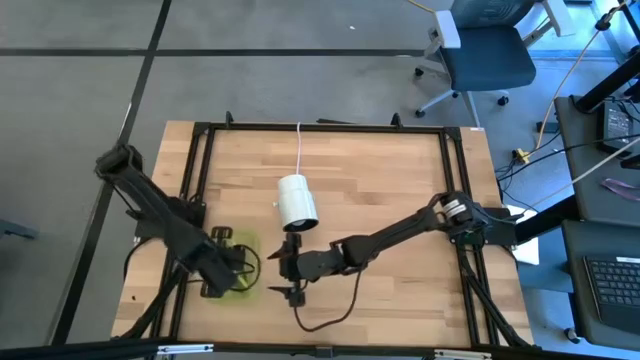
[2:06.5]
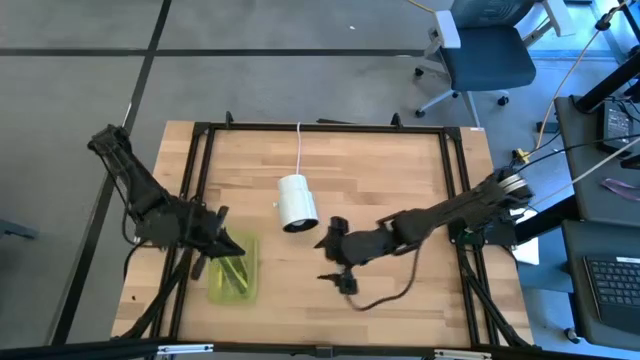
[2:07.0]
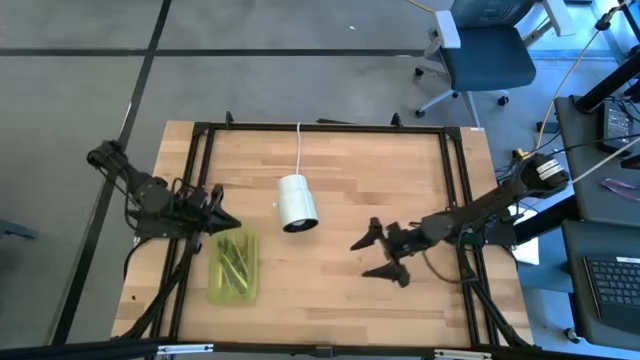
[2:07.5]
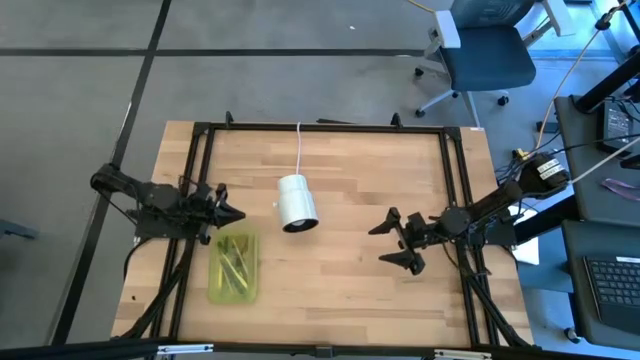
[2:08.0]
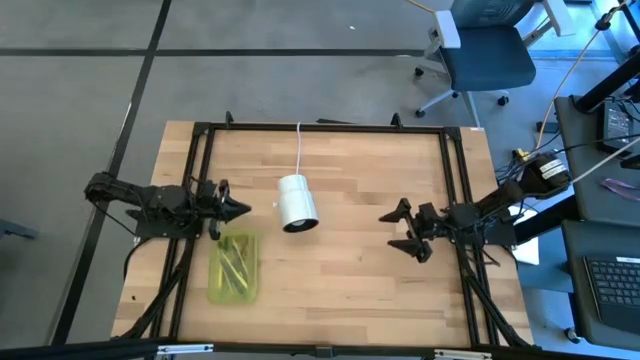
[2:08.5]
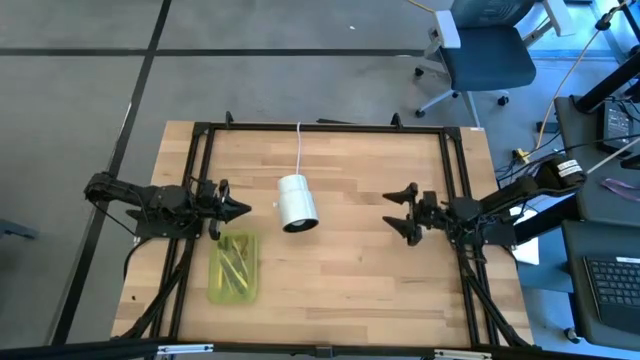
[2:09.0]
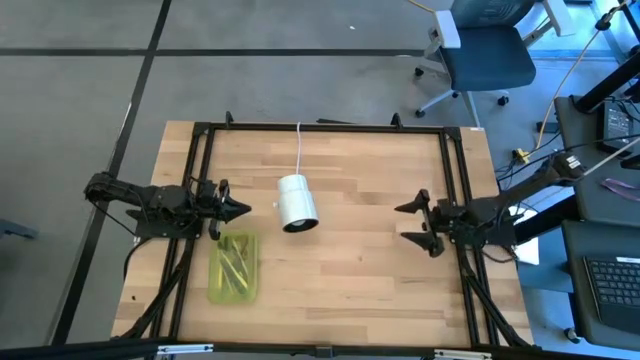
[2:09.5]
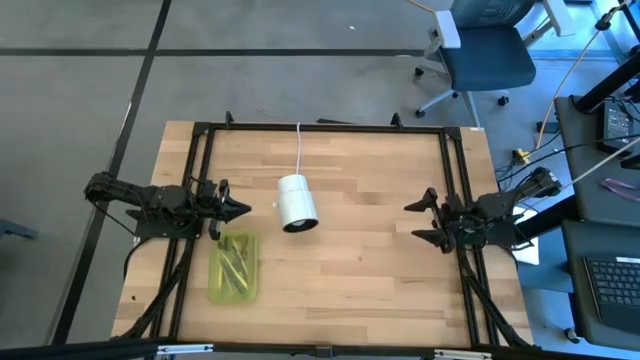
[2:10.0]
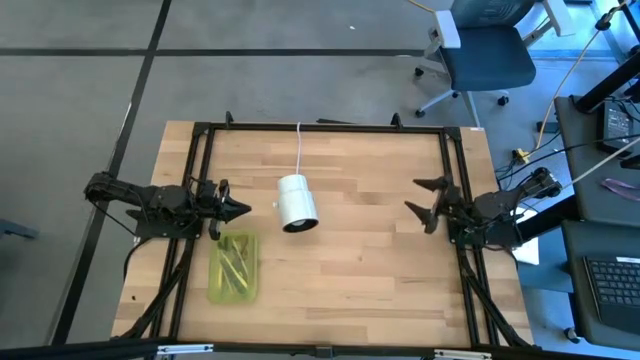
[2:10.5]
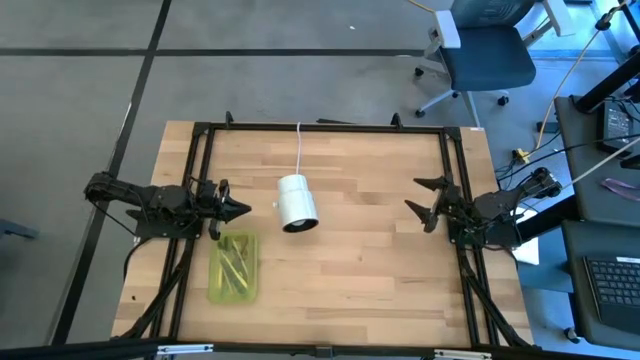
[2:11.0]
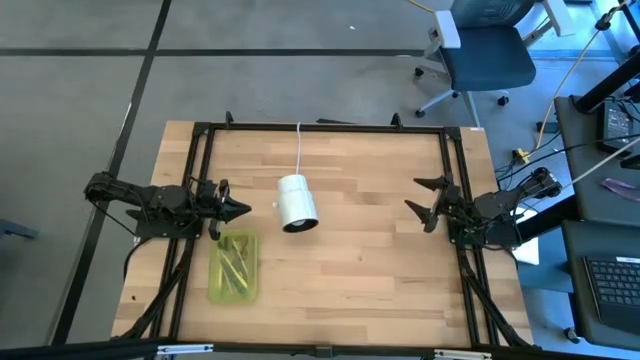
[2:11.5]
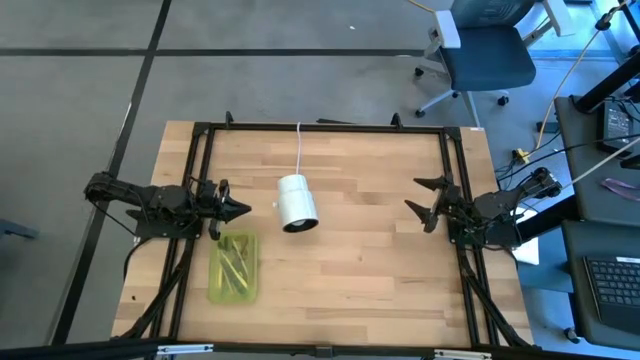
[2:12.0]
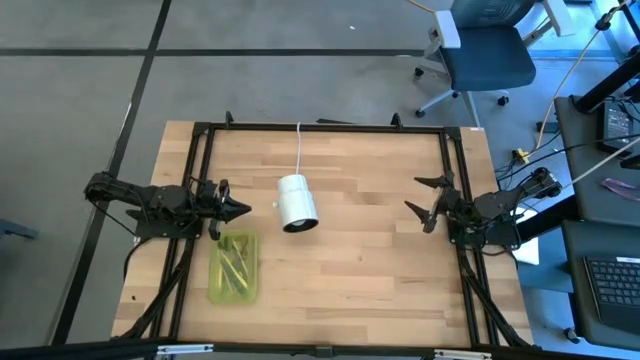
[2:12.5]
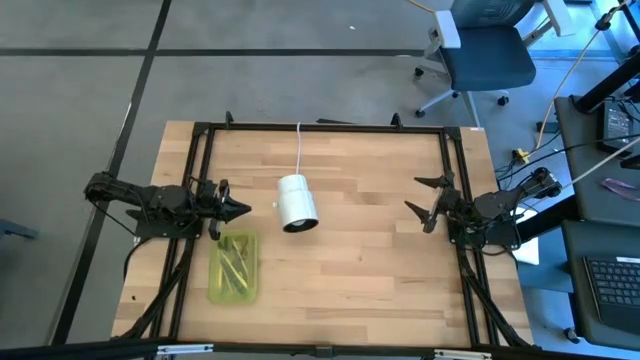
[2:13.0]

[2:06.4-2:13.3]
Task: Pick & place school supplies into a supply box
Return to Home Position

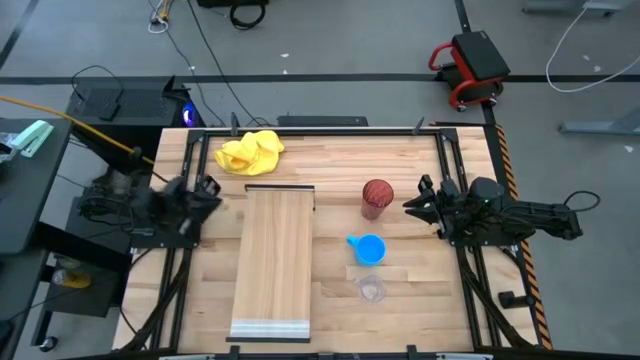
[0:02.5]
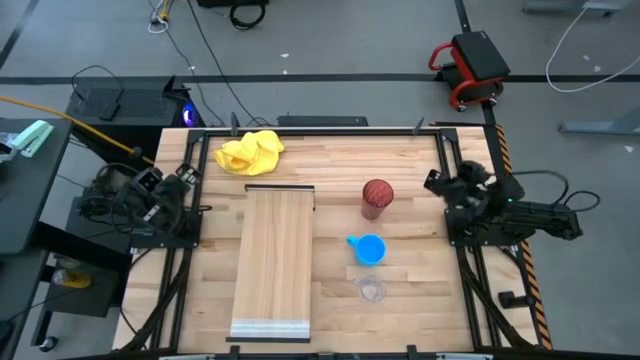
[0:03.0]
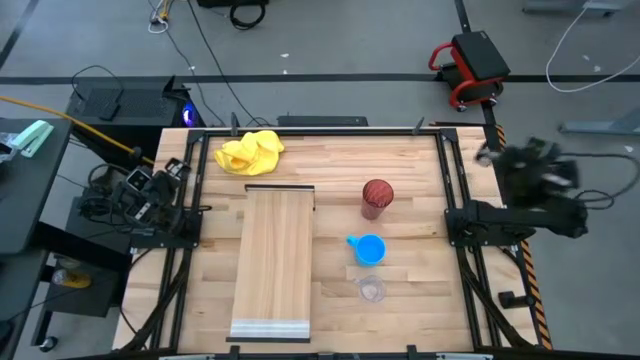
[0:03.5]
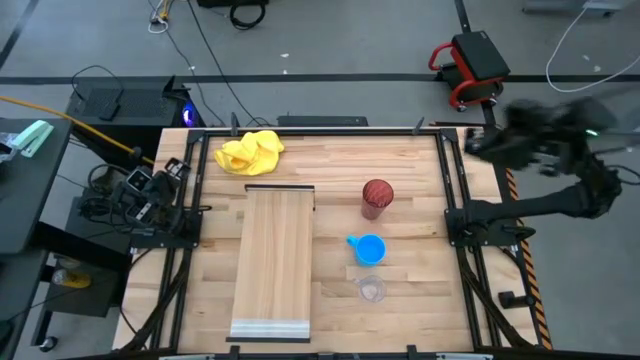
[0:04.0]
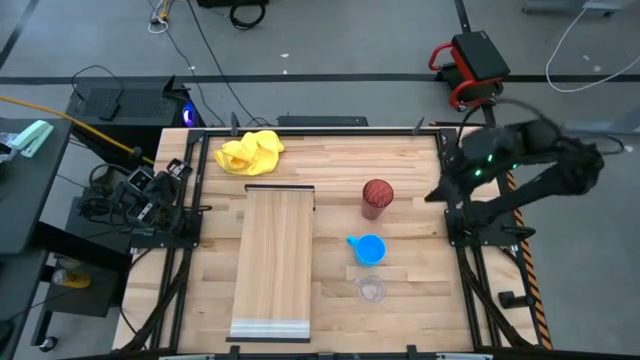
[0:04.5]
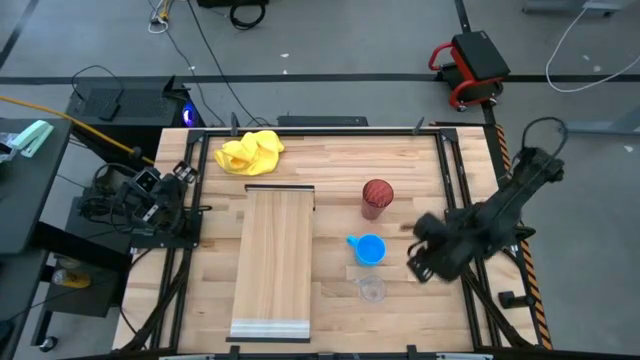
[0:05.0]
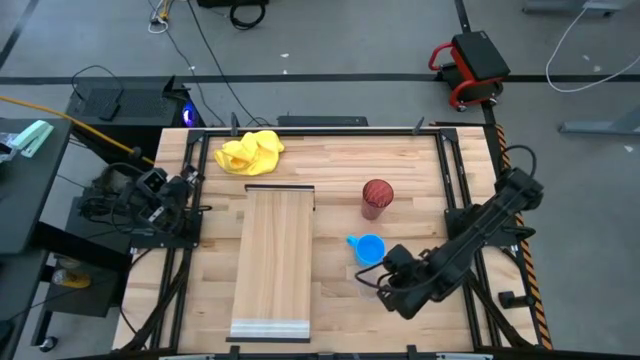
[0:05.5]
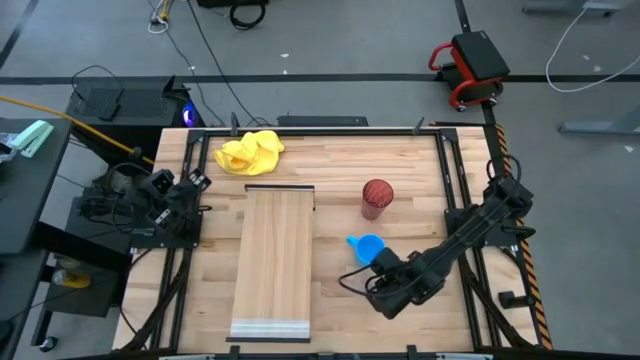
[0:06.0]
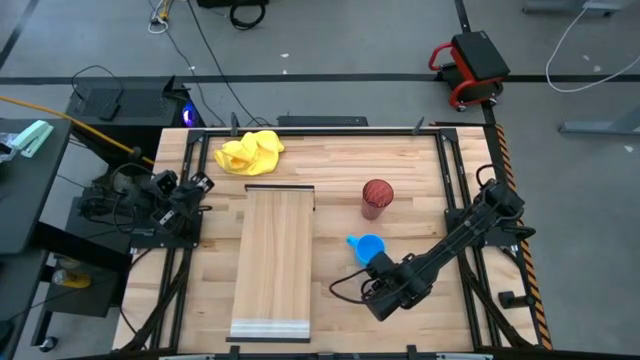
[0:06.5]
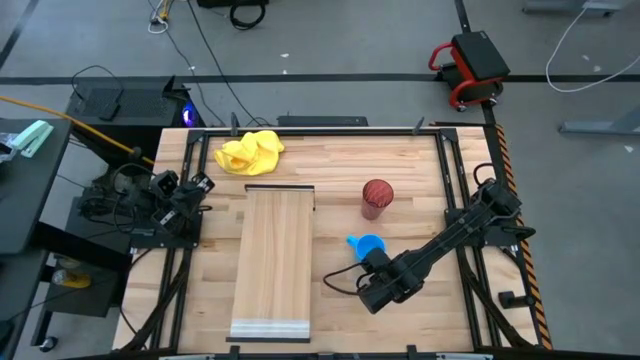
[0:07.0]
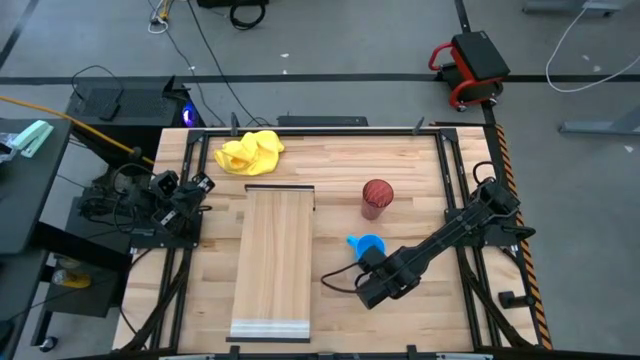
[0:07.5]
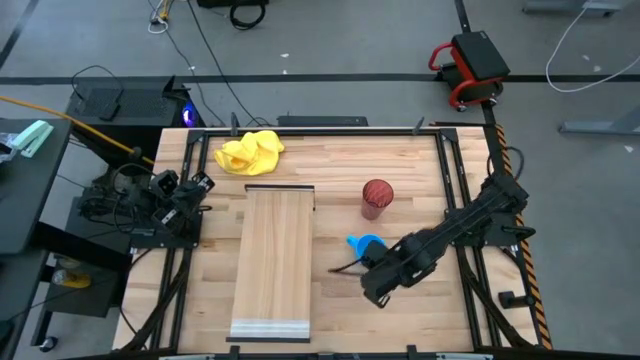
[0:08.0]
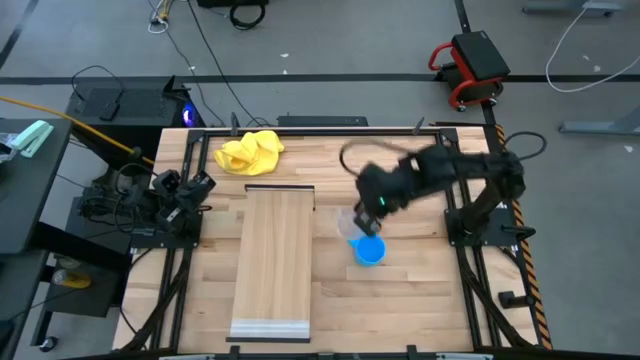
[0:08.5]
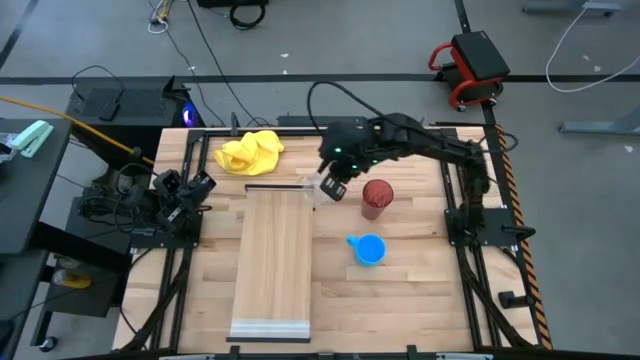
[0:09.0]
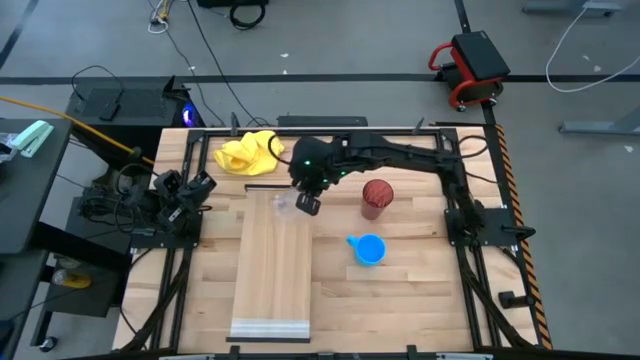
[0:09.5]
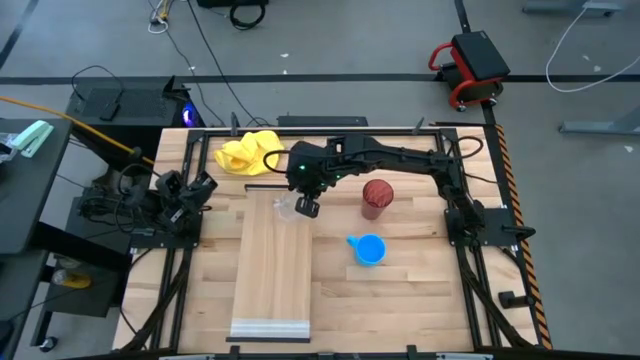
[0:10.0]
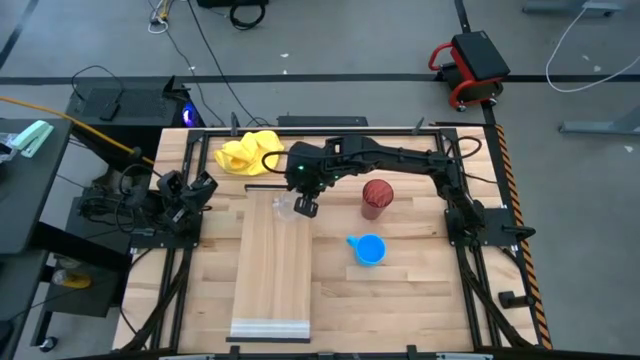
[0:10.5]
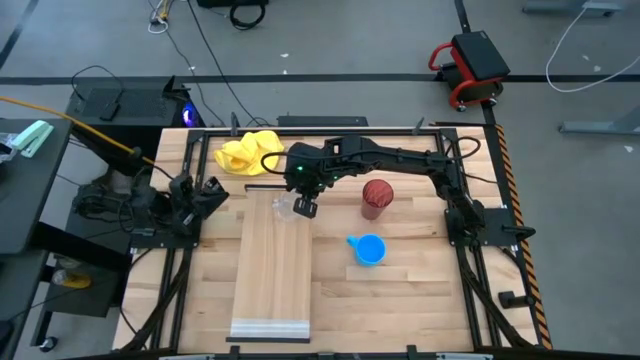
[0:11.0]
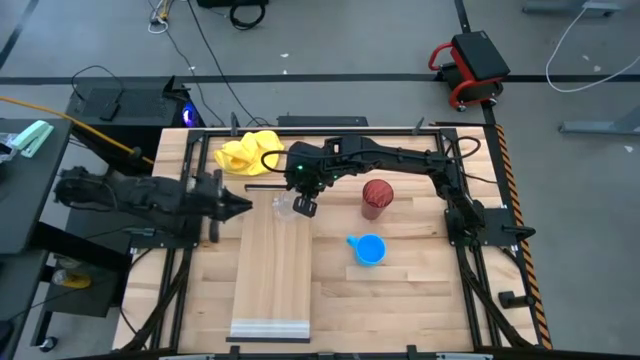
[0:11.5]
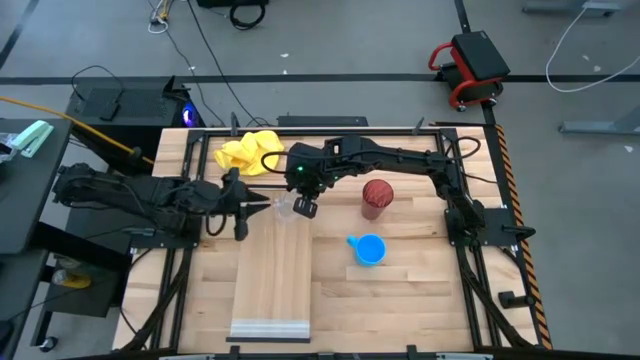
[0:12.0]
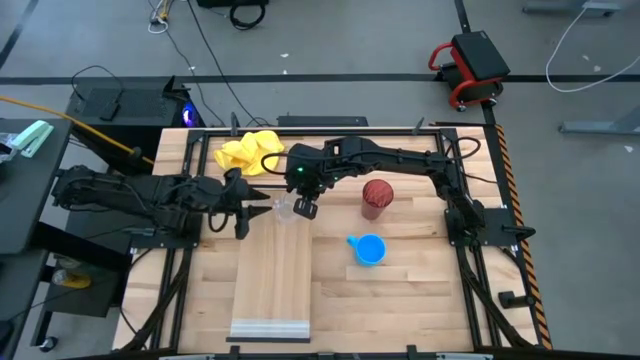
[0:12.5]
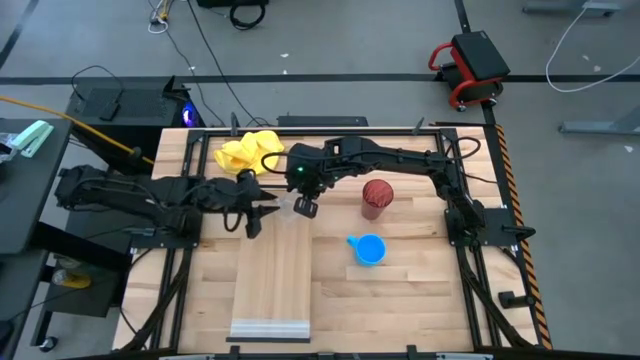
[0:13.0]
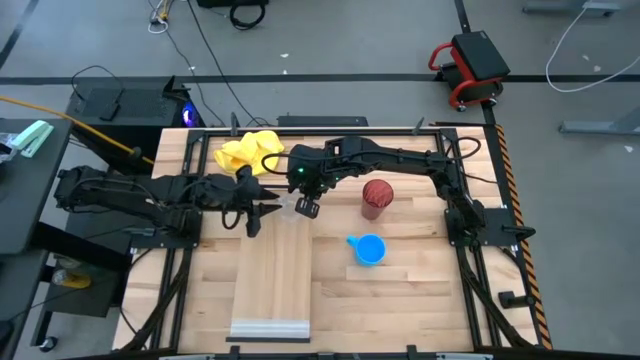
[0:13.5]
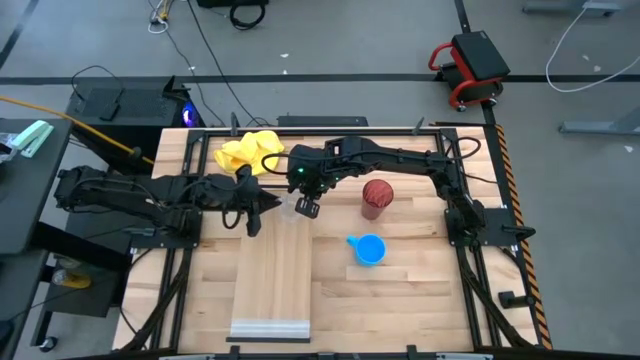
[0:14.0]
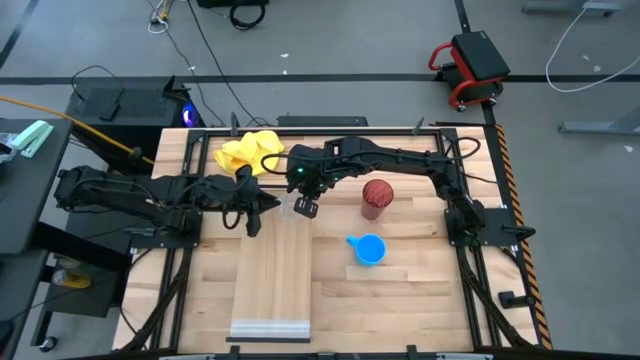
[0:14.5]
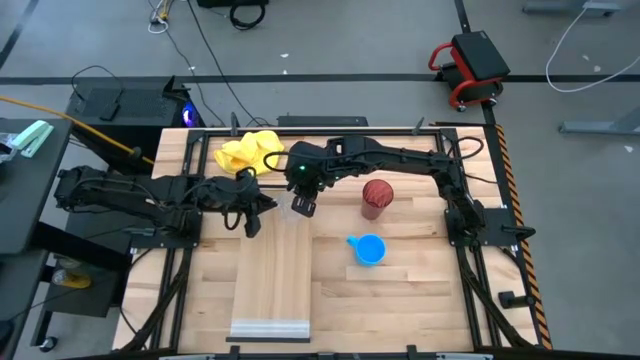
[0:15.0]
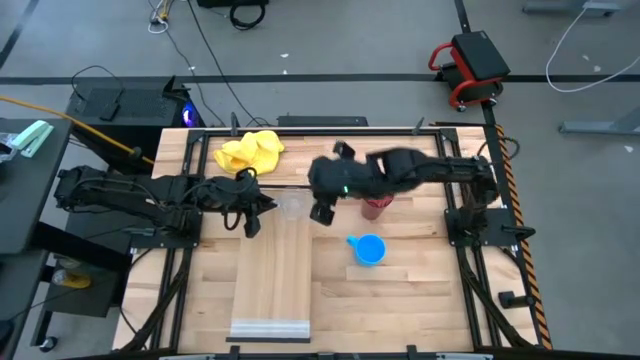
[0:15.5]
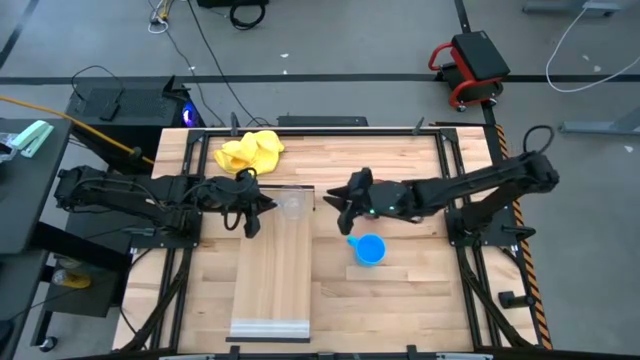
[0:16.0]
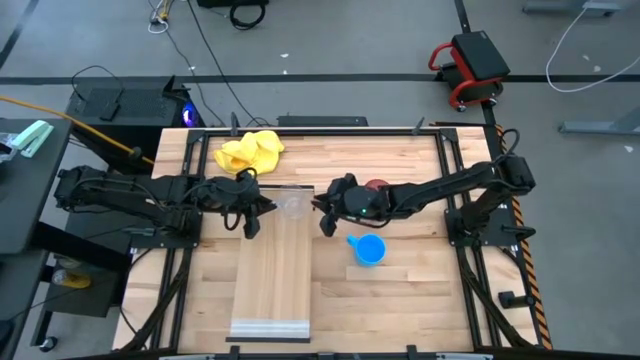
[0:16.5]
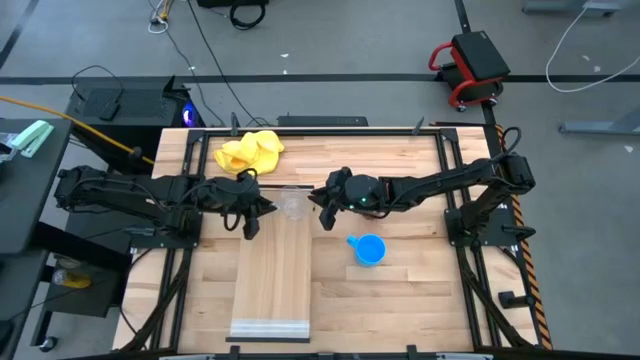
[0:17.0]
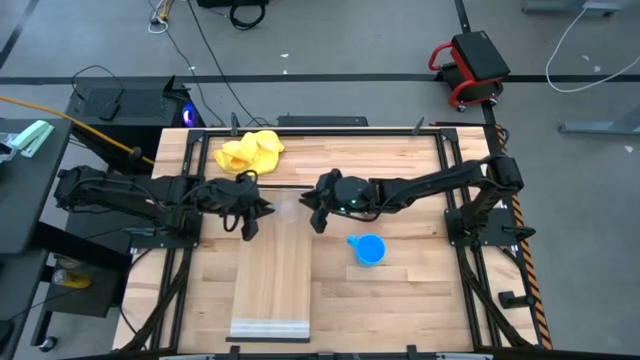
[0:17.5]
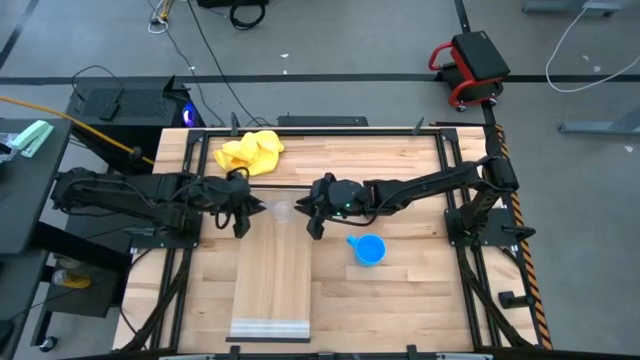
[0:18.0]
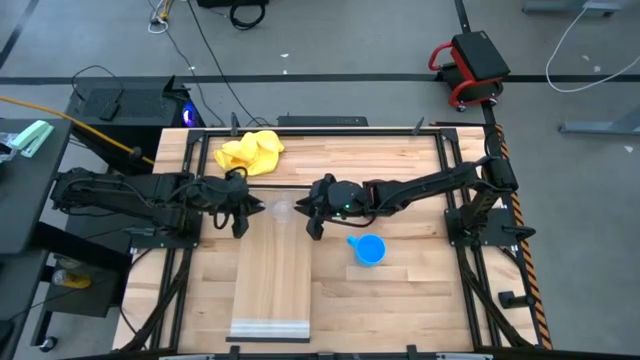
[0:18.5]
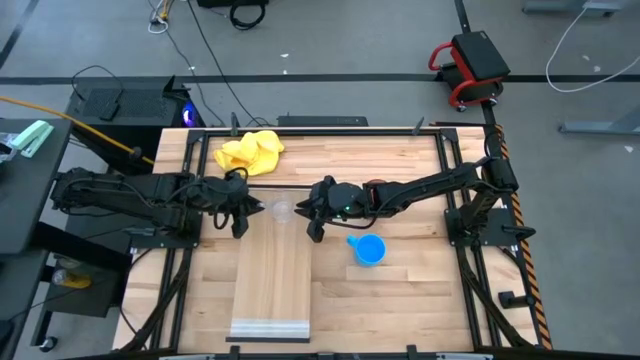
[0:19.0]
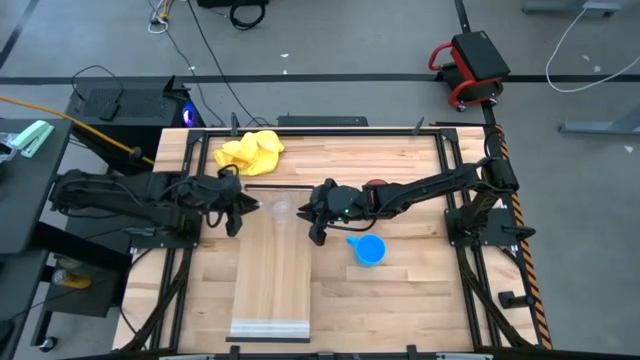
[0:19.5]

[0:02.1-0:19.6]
Task: Stack small to large cups/mugs on shelf
Put the transparent mug on the shelf
